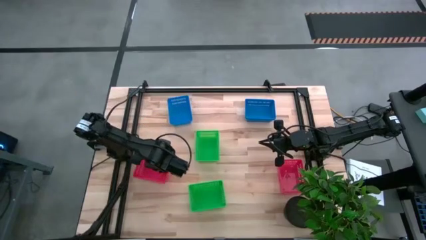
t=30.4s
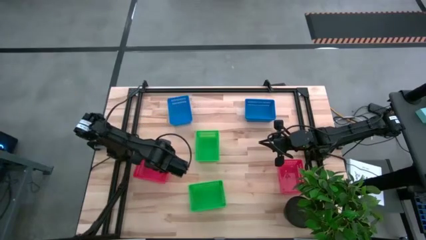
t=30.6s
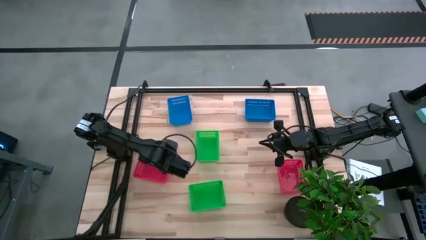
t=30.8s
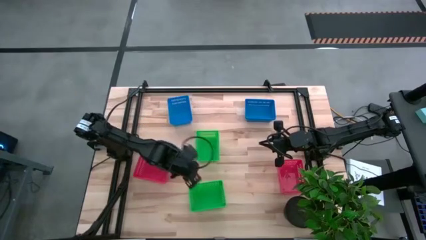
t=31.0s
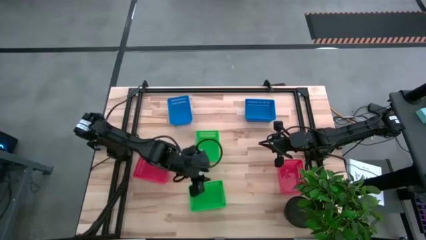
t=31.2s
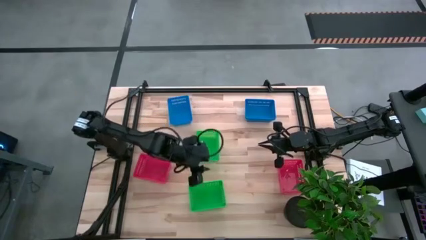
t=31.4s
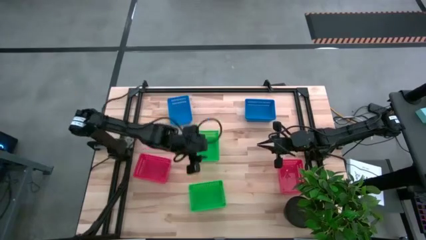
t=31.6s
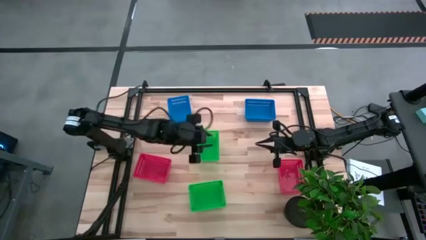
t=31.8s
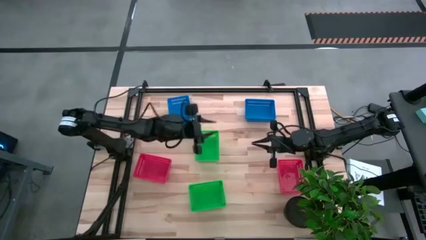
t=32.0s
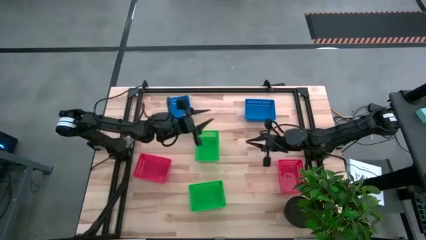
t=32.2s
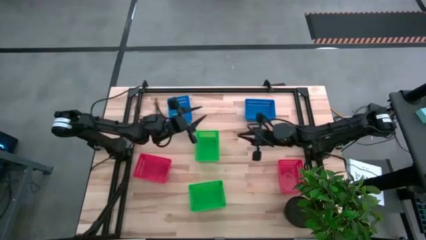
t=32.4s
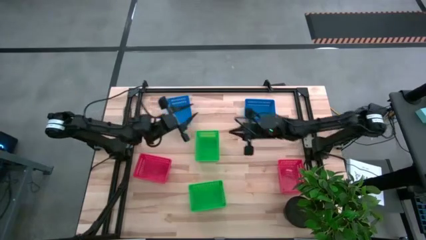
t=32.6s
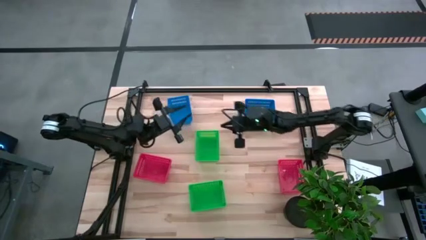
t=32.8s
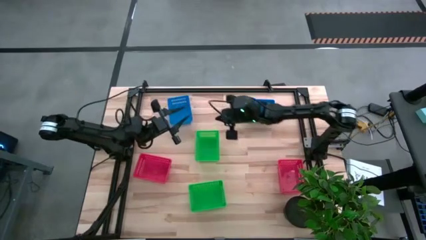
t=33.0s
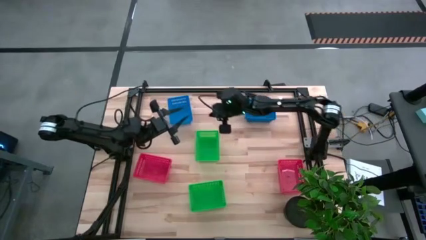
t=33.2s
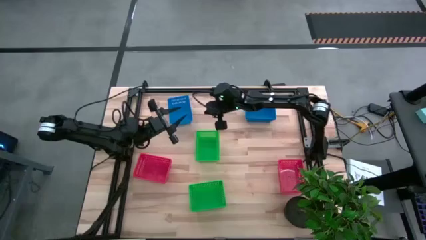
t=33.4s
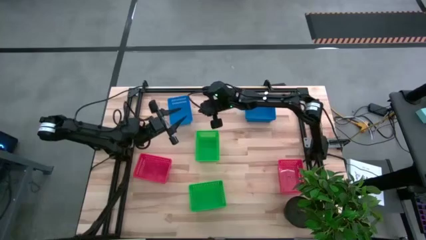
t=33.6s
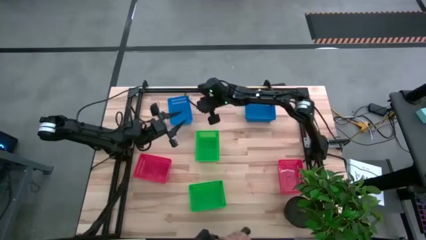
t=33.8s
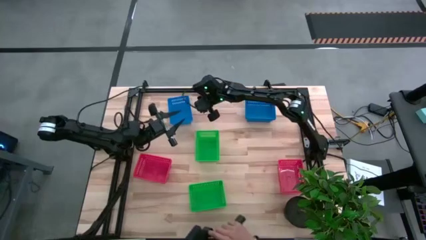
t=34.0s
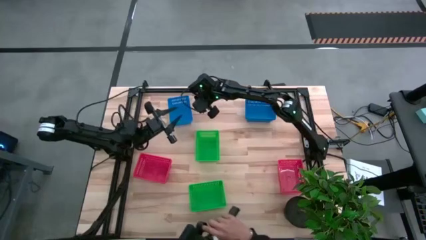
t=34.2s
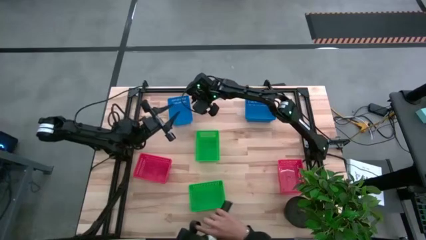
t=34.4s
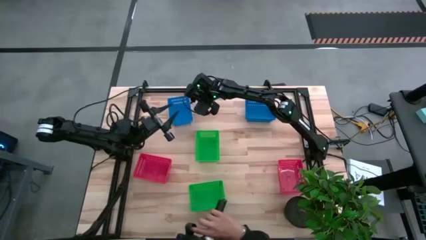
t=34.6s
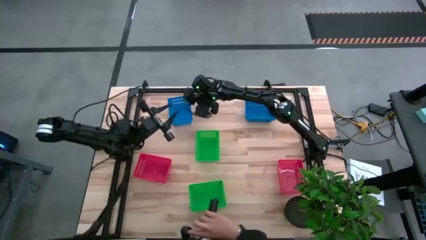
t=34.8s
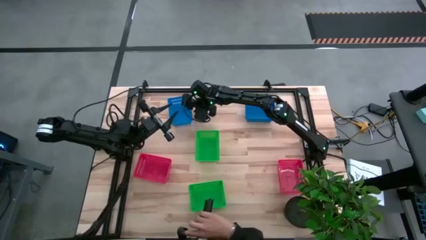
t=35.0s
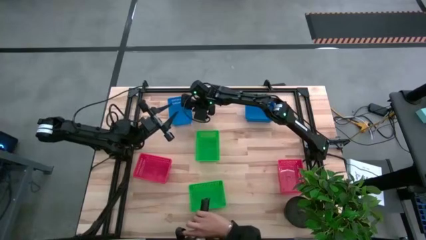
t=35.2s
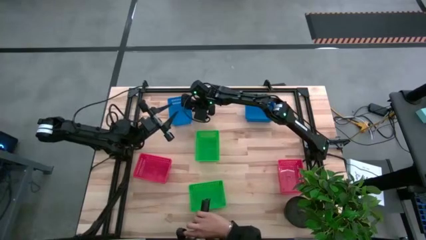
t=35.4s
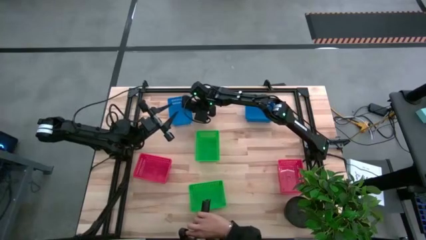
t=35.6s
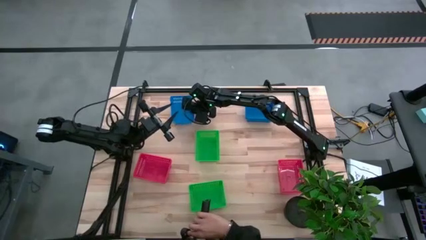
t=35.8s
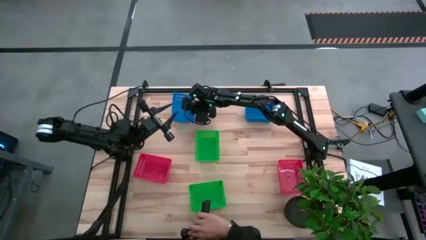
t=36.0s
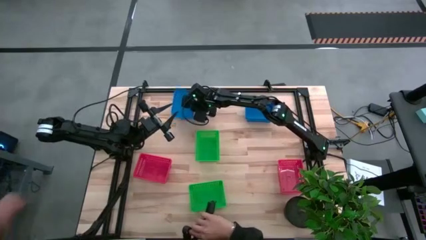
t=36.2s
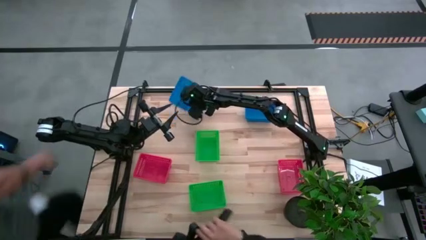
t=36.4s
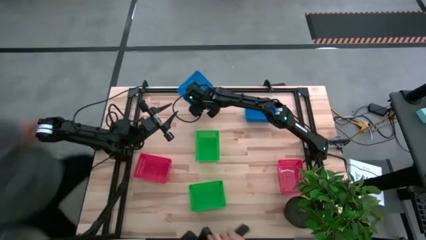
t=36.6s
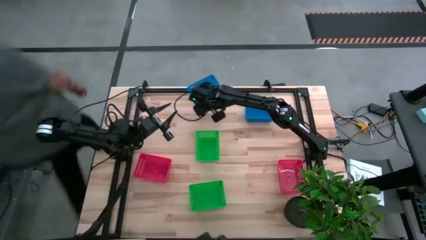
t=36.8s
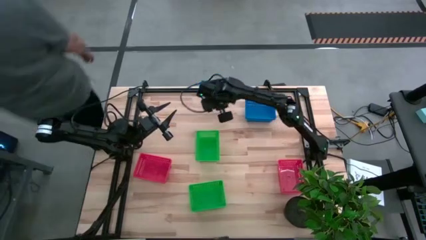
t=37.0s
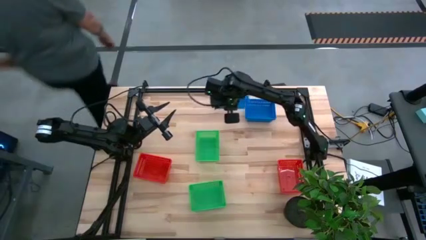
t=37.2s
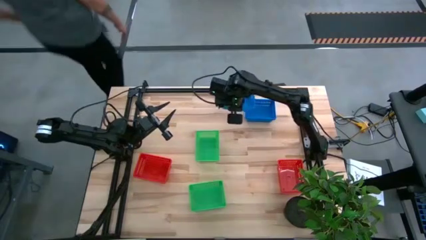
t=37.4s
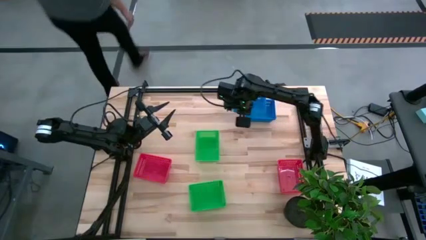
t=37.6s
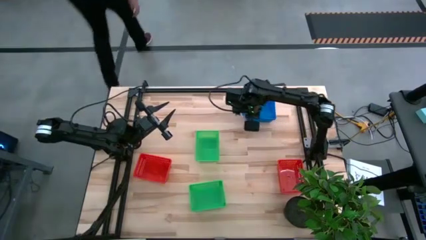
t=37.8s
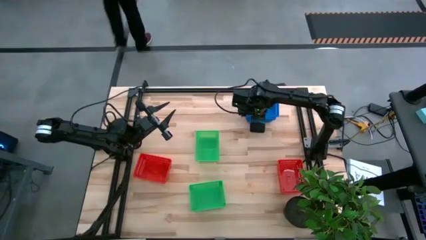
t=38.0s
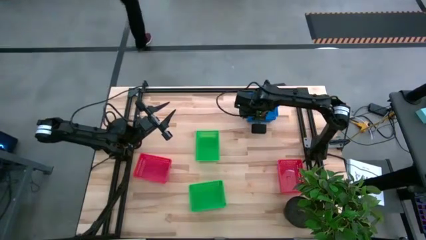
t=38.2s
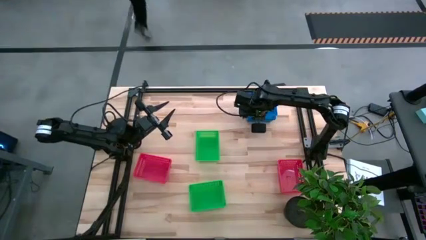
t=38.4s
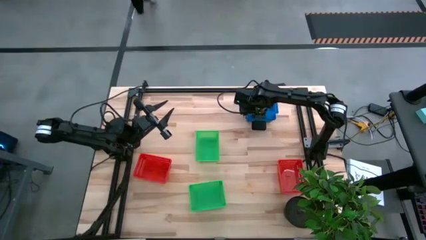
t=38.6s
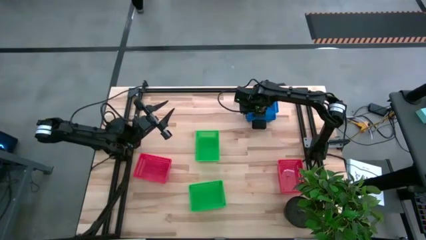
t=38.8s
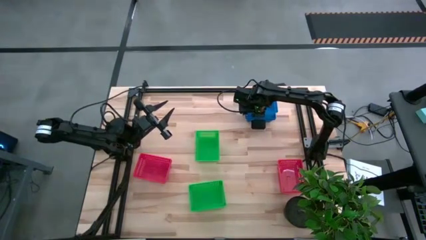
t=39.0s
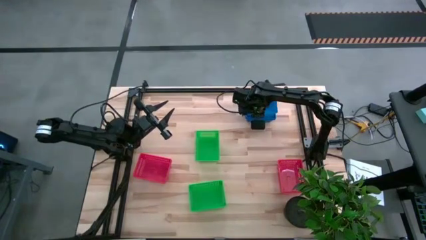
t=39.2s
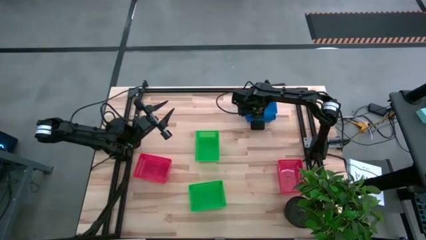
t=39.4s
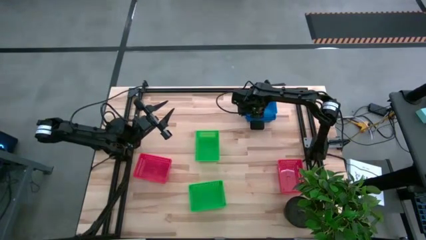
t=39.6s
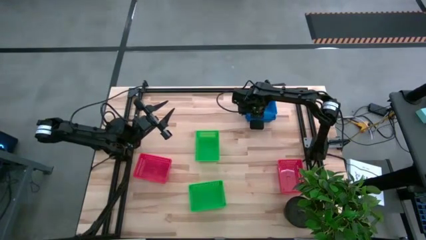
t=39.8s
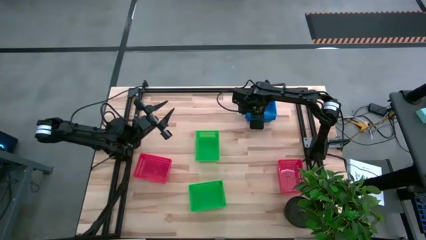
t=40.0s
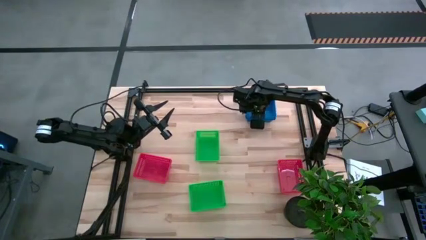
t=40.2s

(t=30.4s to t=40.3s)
Stack the left blue bin on top of the stacked blue bins

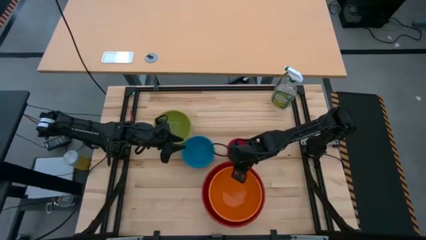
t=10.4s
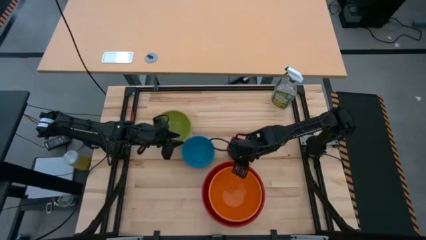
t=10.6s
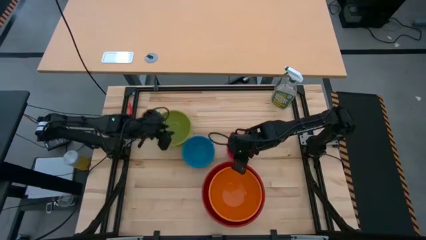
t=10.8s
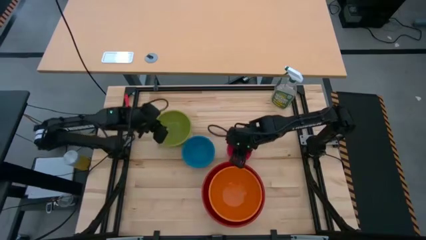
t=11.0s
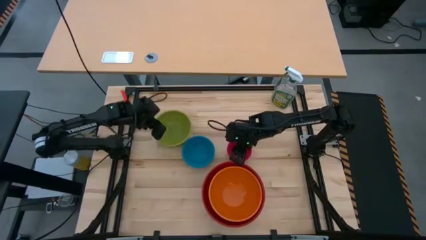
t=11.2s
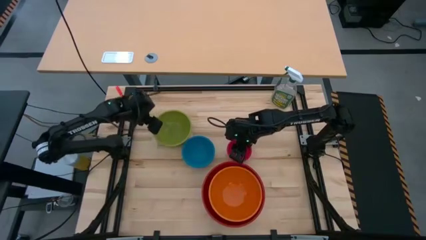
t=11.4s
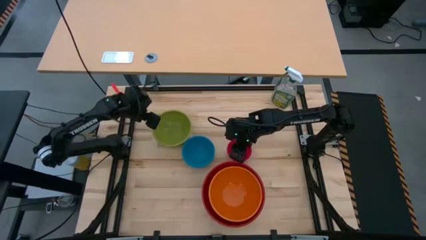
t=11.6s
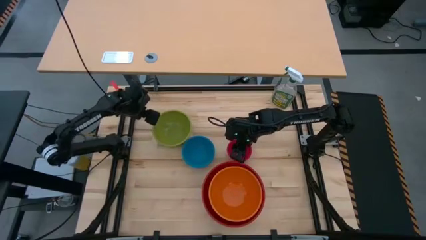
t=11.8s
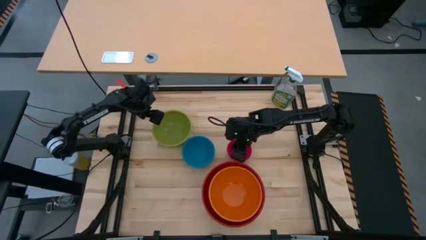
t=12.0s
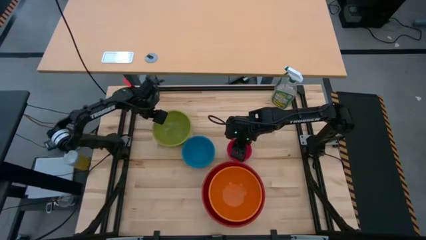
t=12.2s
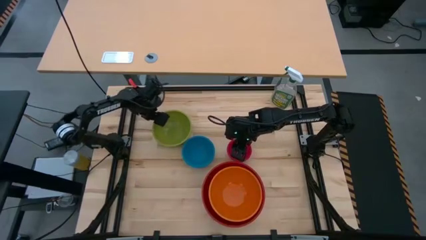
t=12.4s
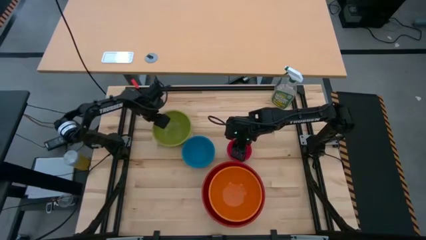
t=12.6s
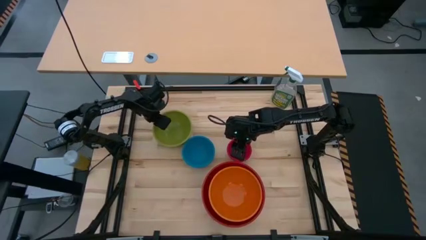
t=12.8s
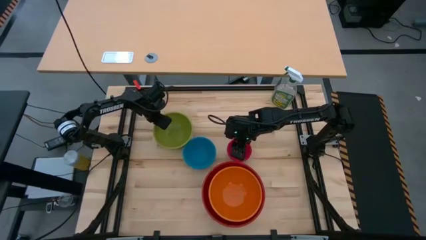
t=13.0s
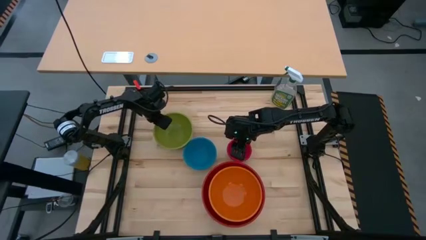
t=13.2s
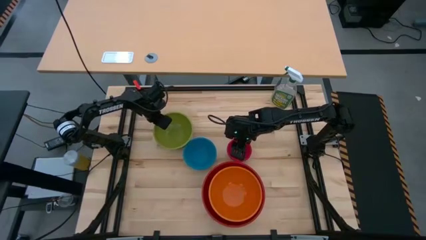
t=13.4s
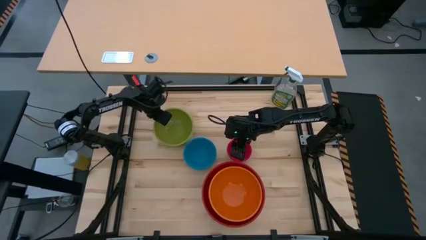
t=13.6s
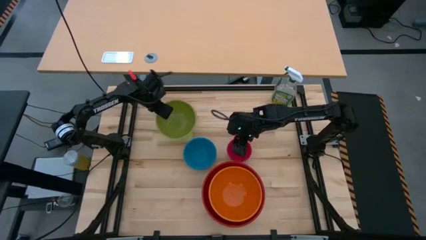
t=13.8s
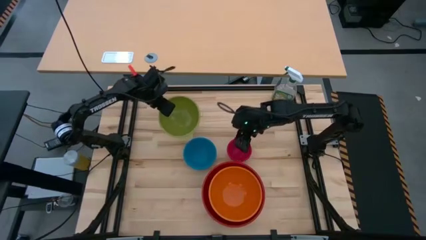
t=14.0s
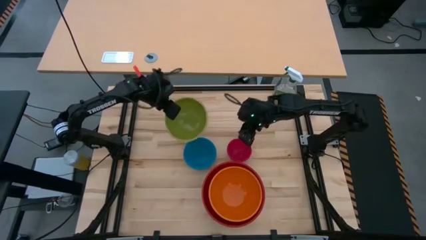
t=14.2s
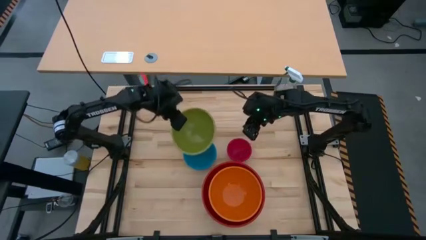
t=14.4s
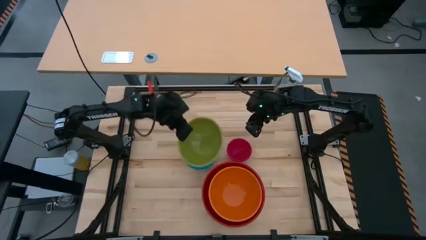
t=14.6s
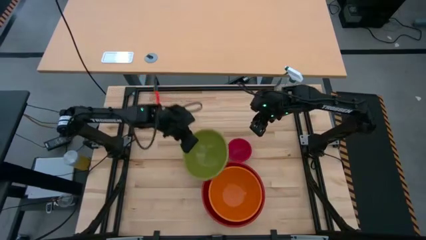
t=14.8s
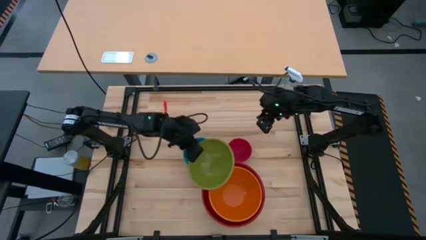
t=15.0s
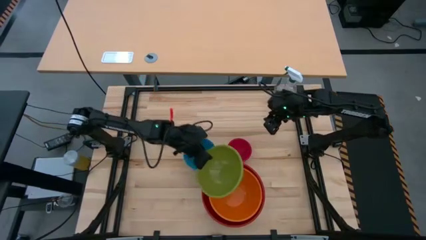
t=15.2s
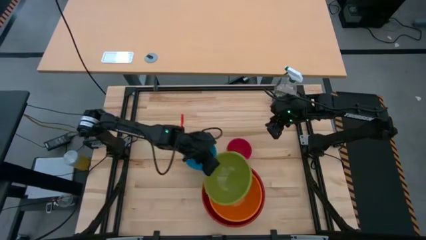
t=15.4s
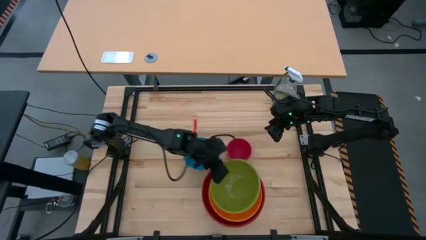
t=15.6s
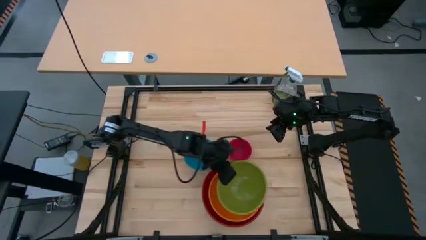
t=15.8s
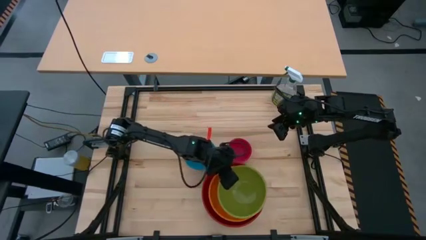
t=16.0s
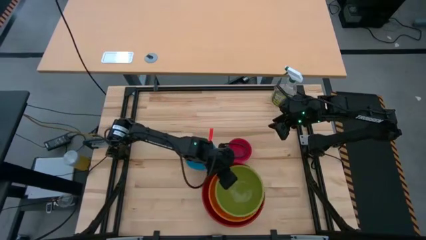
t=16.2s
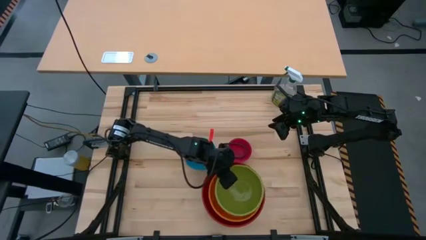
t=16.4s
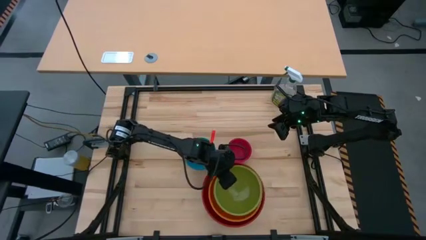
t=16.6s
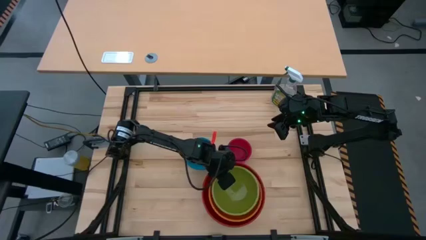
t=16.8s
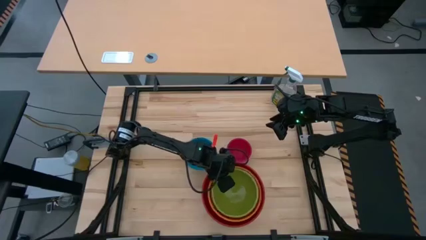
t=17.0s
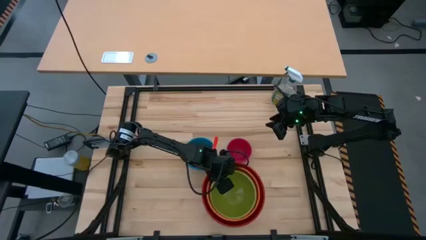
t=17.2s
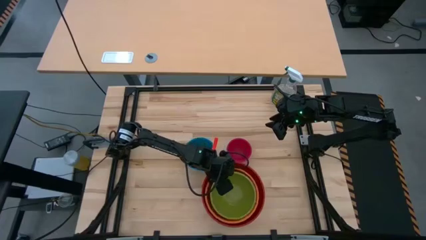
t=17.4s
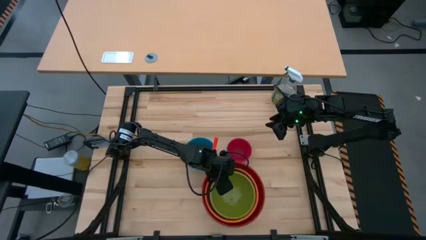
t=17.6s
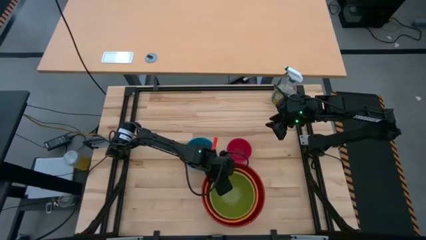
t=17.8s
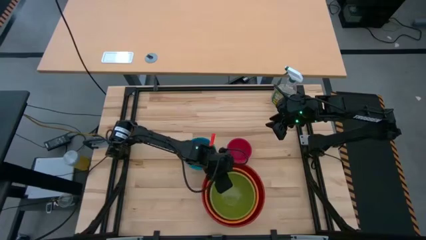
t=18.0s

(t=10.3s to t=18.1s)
Stack the green bowl on top of the orange bowl
